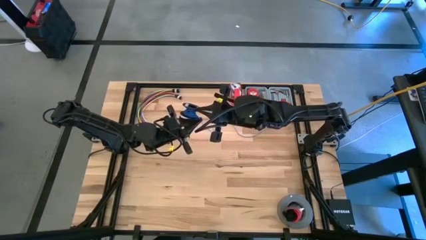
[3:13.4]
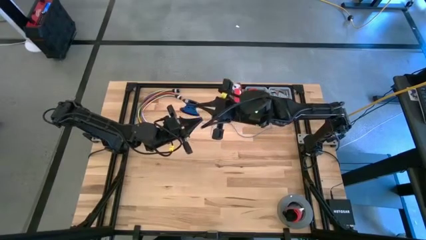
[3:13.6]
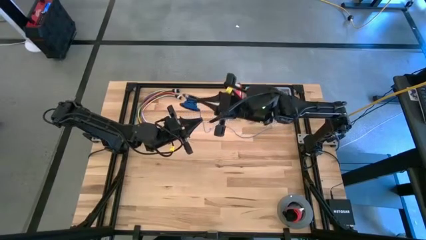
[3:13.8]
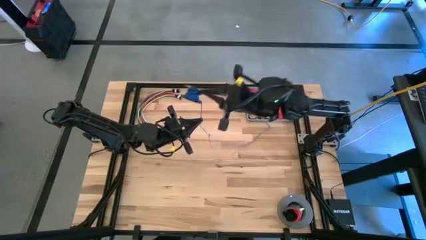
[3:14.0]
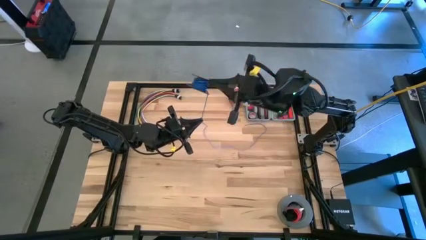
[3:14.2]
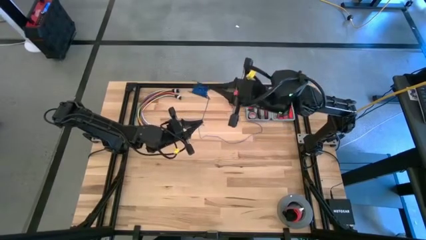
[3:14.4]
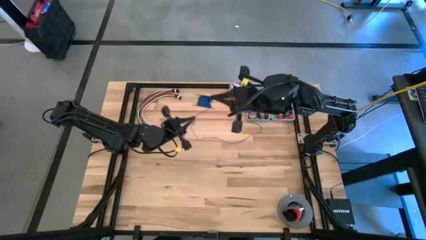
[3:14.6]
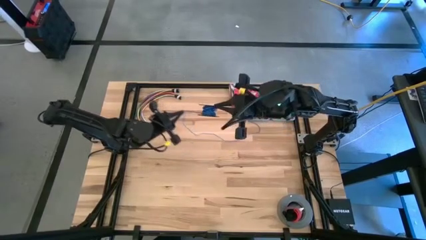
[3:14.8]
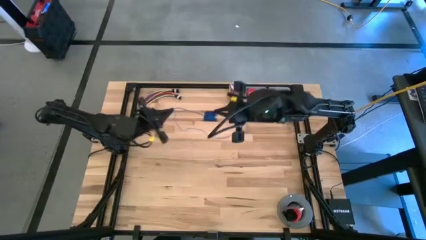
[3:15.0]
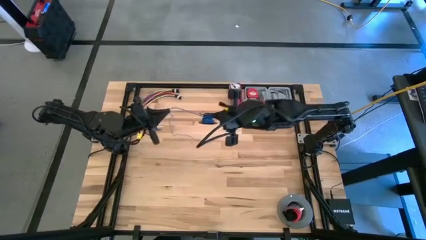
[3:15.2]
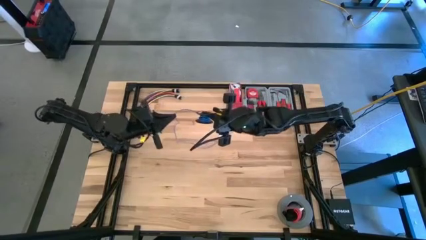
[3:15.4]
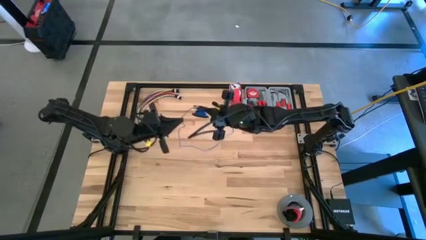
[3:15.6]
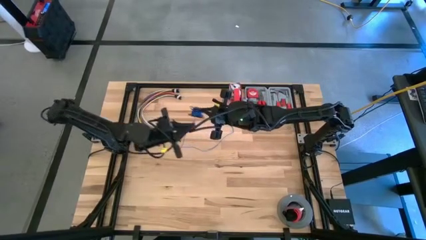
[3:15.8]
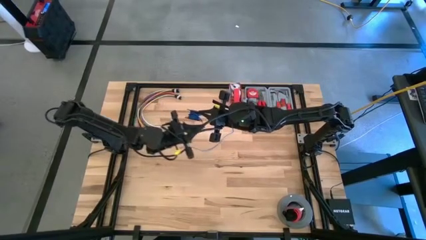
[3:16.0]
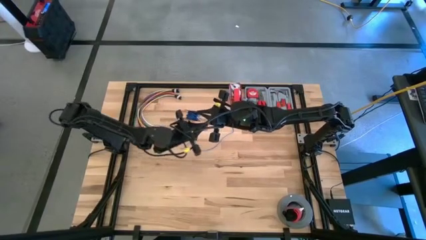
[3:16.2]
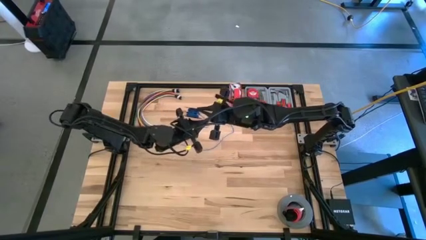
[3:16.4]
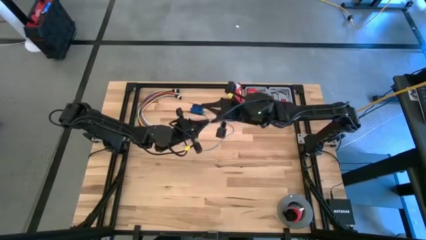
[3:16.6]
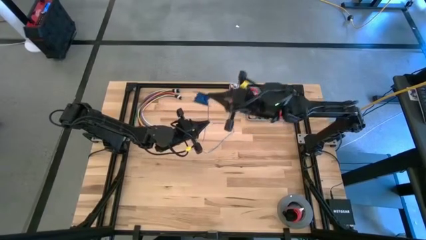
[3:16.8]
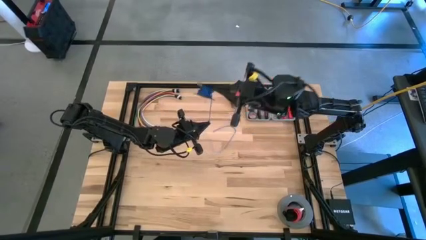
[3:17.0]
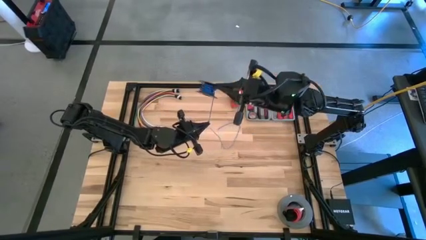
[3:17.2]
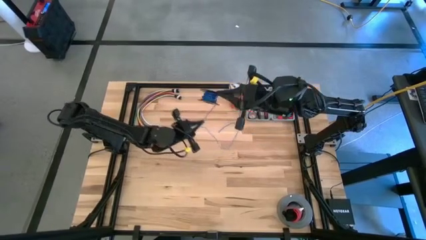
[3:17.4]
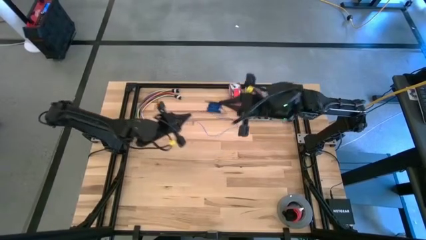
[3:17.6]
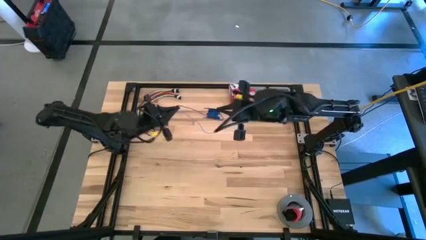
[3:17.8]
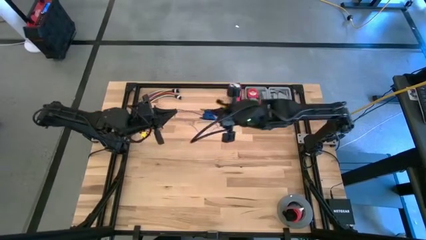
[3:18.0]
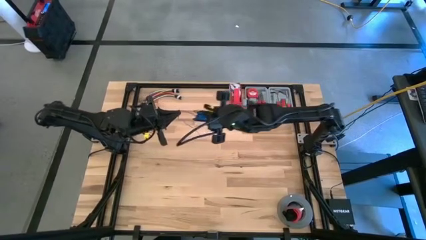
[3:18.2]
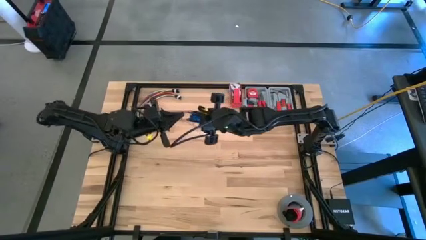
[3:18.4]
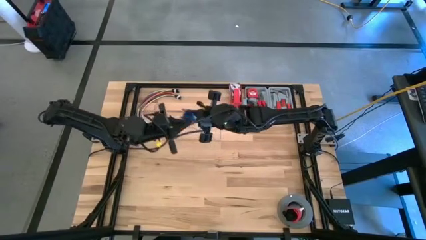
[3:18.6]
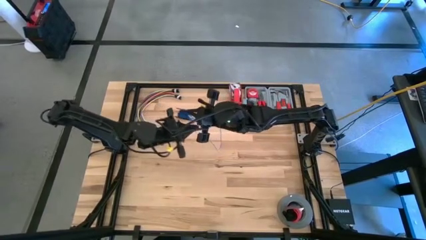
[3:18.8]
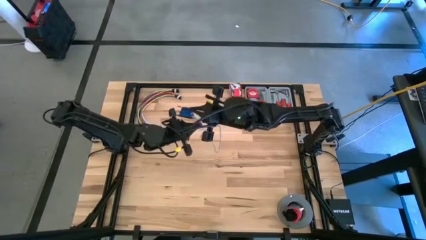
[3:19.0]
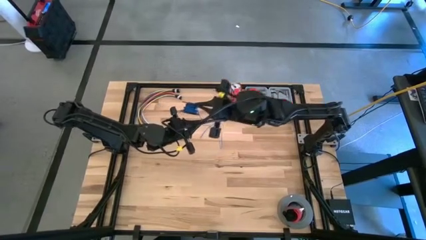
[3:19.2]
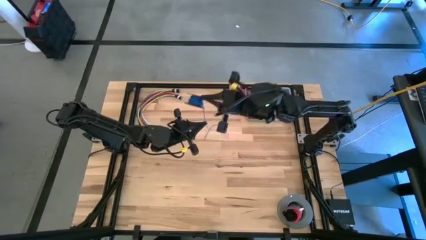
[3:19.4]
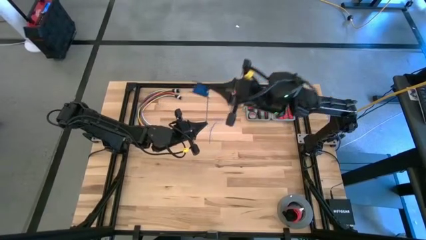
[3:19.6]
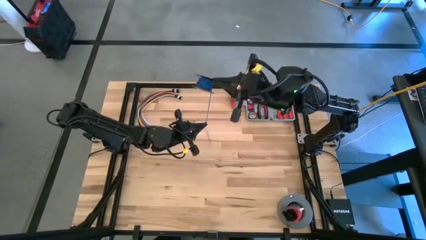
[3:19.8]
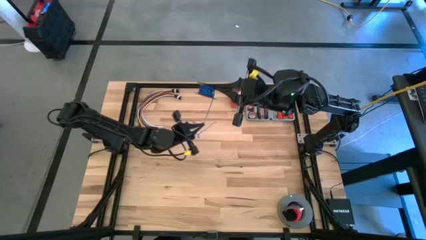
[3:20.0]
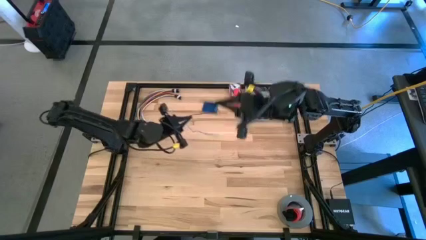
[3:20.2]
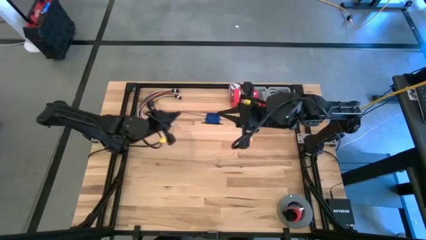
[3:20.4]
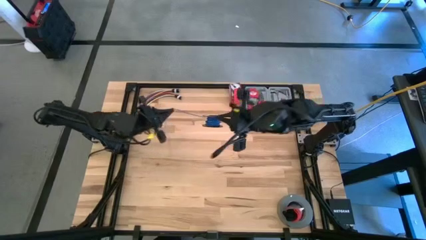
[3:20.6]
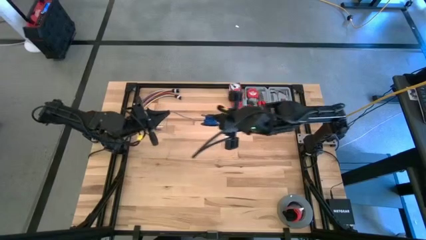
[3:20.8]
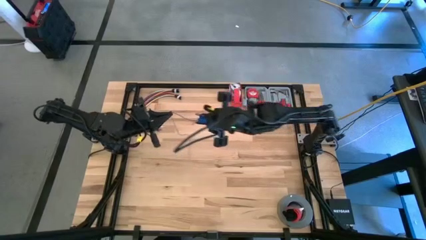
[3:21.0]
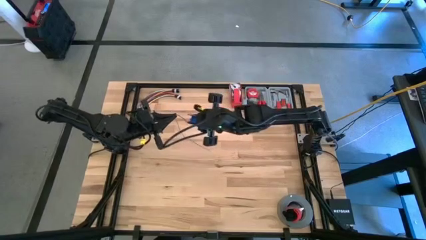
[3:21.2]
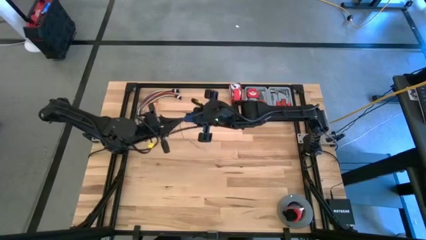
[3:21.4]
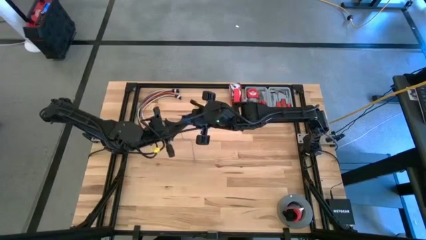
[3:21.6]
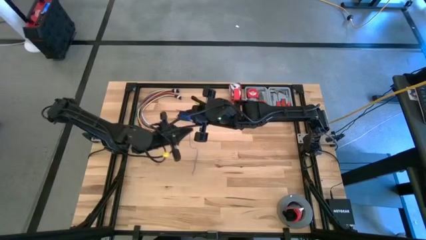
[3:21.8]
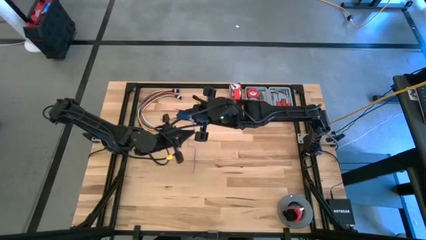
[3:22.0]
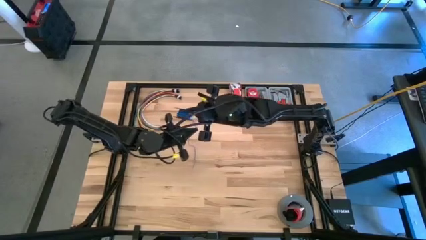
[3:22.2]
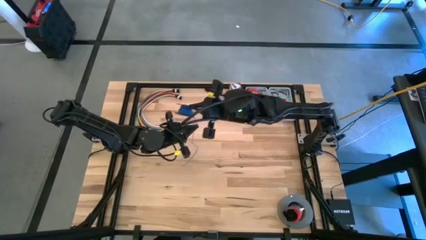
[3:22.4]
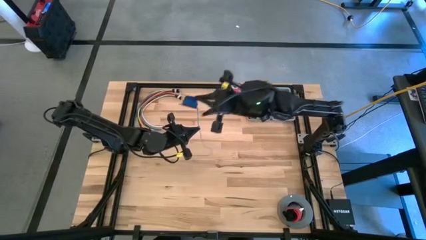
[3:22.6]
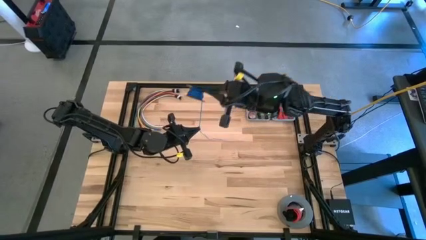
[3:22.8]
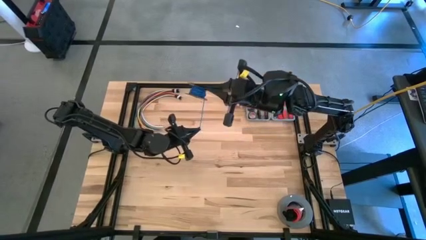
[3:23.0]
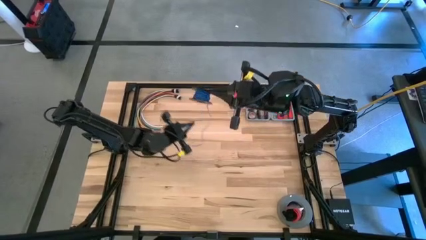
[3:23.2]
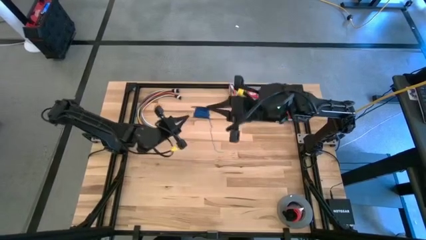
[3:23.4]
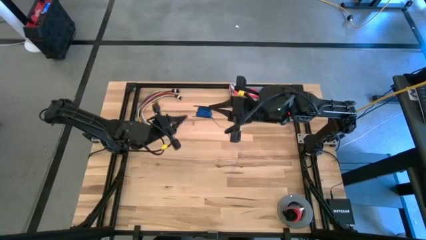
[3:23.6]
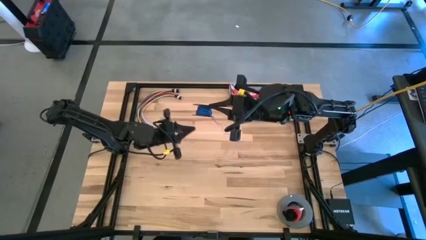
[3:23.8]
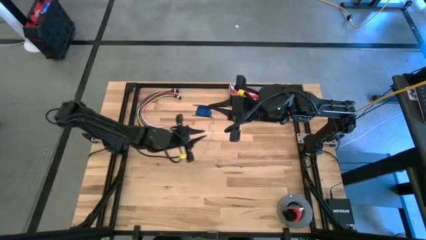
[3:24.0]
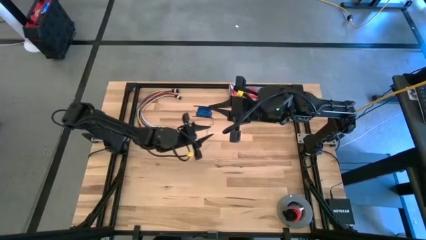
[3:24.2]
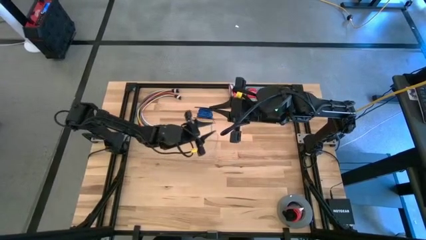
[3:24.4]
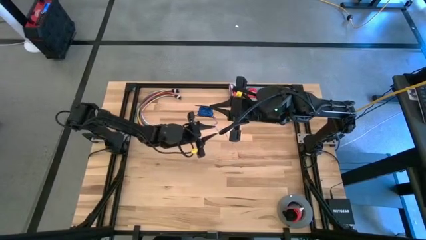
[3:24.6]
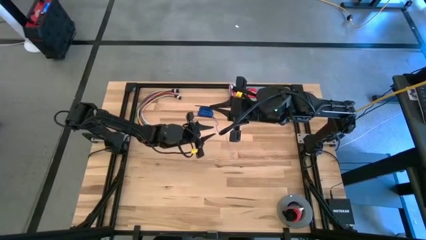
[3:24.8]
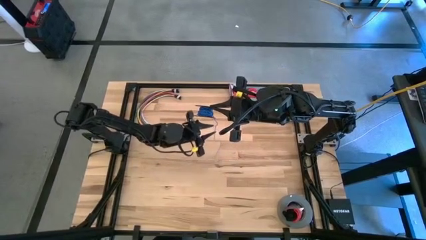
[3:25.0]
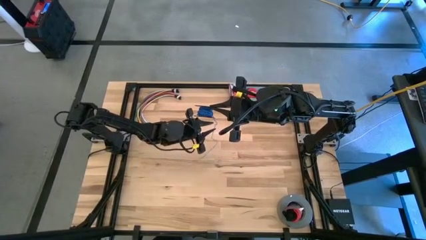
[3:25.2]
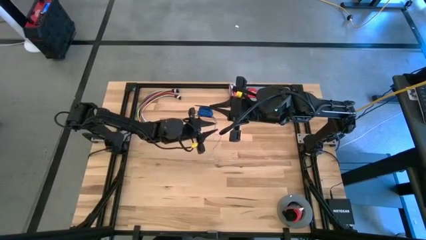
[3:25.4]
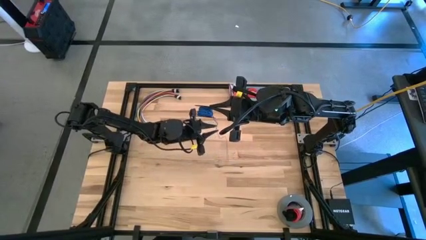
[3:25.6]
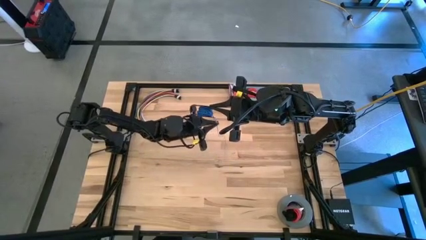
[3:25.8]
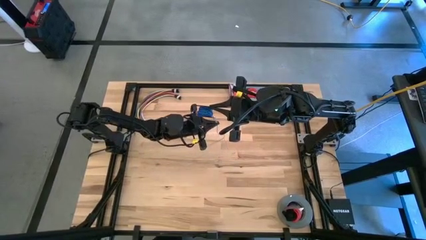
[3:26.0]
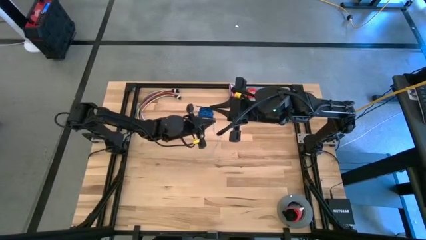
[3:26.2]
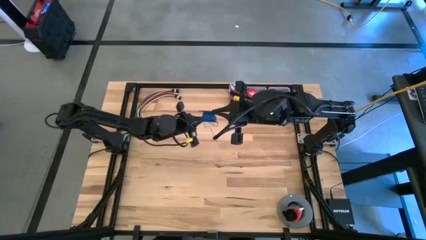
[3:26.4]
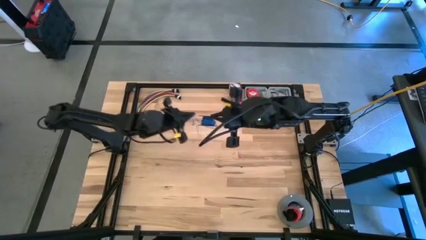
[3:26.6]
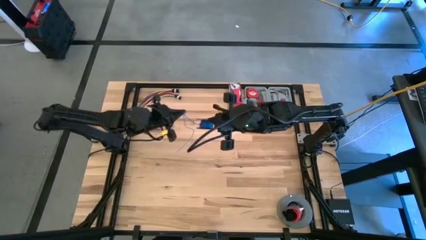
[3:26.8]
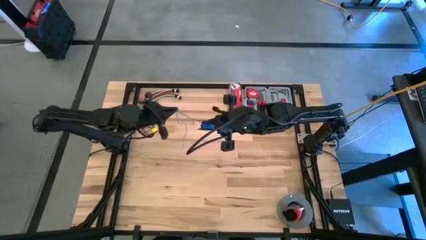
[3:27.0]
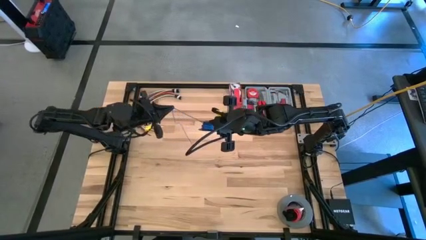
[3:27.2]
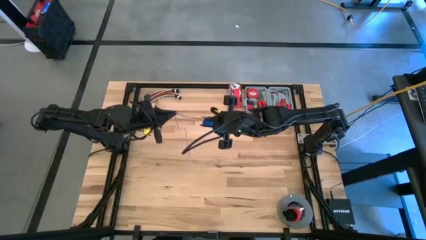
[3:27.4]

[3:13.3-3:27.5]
Task: Coil cords
Coil the blue wire on the black spool

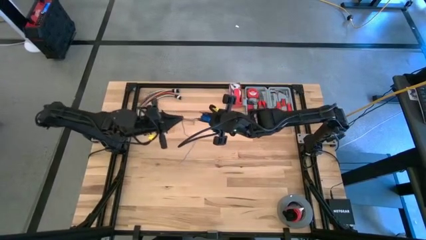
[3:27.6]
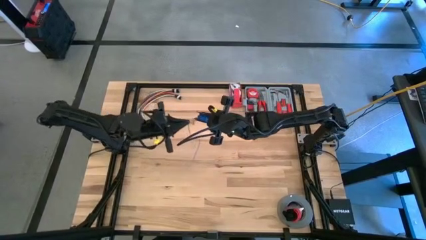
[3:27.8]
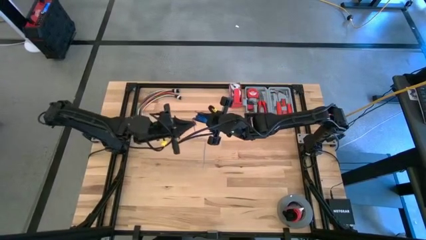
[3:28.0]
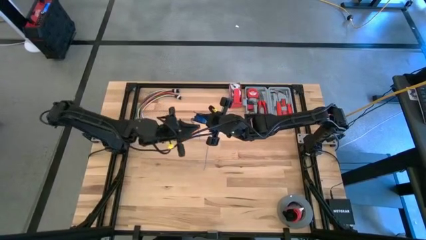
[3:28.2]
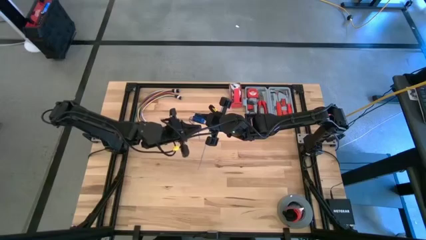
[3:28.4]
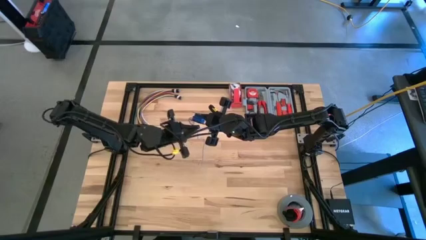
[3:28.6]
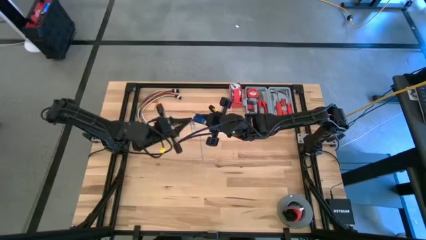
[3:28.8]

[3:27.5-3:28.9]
Coil the blue wire on the black spool

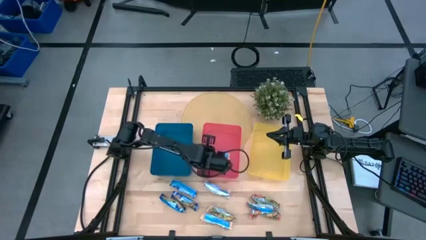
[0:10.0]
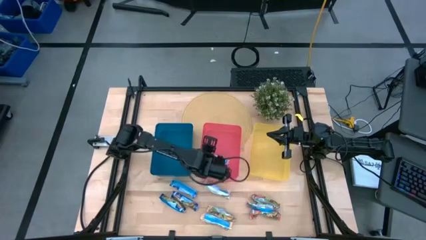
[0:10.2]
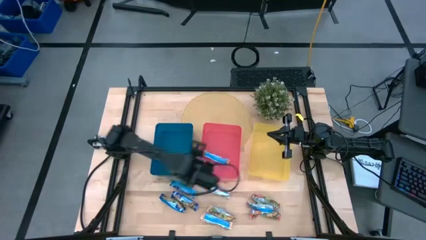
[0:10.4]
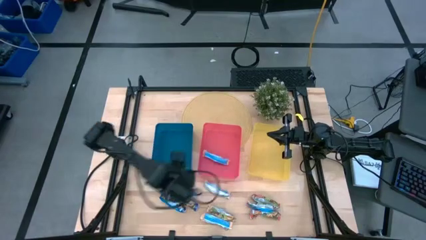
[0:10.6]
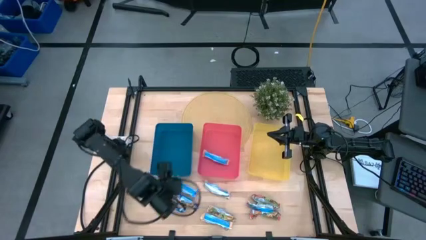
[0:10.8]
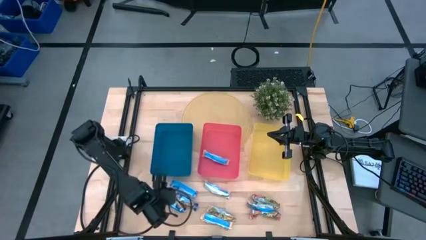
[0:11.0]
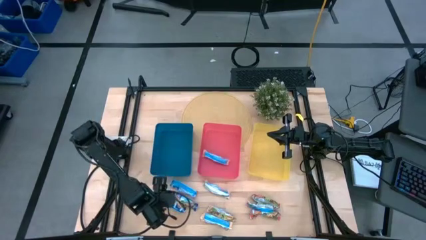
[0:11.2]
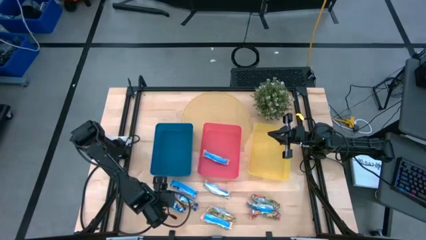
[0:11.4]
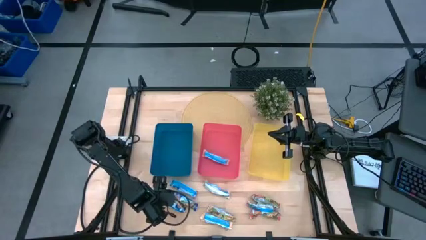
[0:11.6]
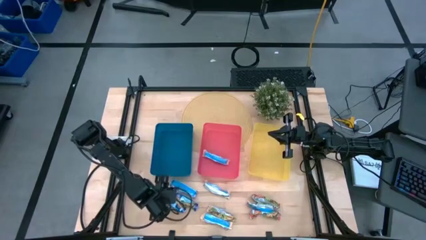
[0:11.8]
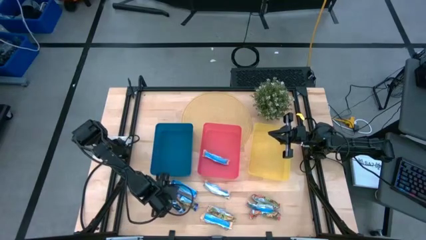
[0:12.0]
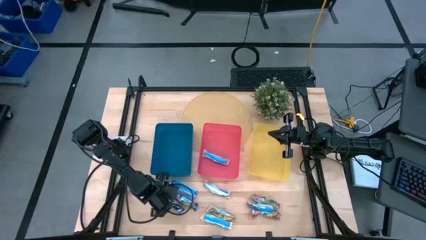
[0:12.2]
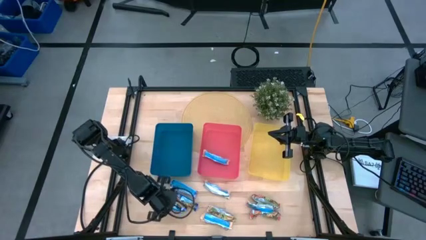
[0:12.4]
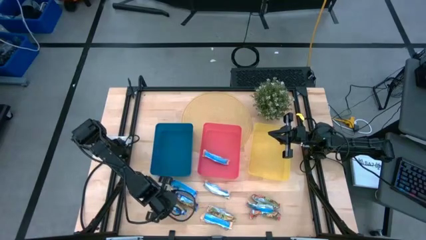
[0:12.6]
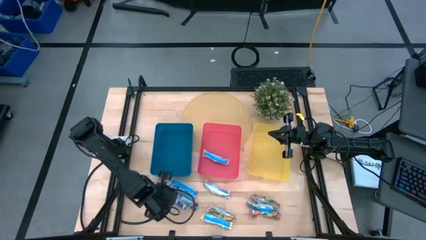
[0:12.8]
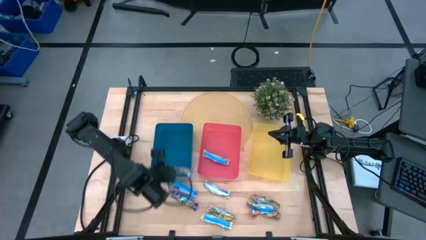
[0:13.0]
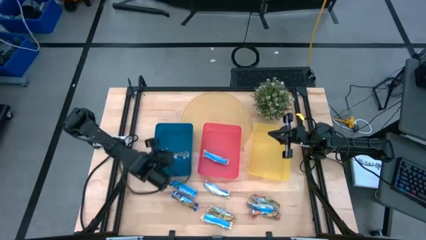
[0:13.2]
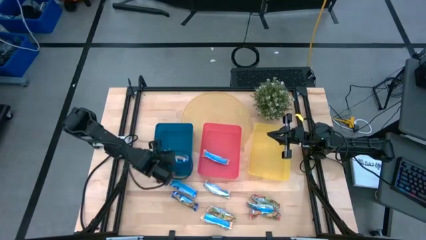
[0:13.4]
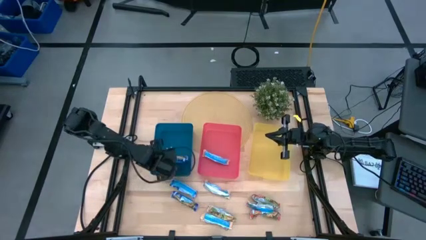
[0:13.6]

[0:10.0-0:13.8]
Task: Pick and place Granola Bars by type
Put the blue granola bar into the blue bin
